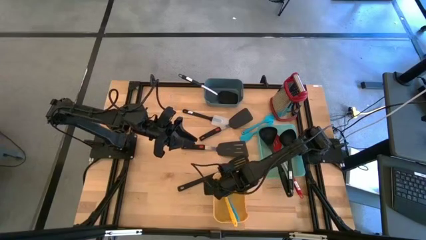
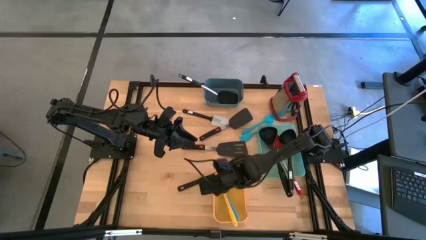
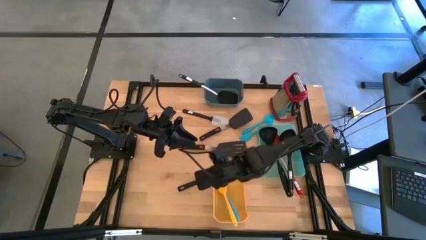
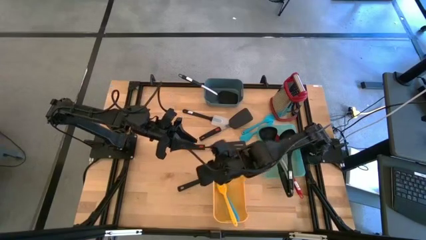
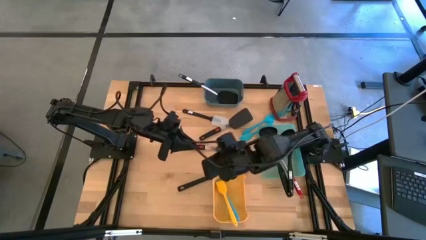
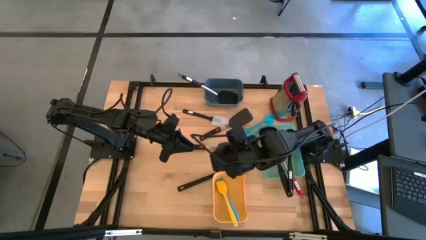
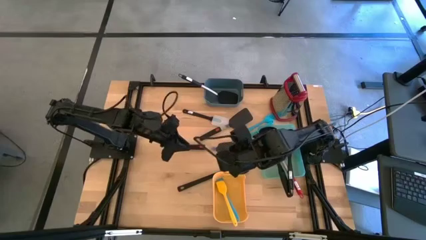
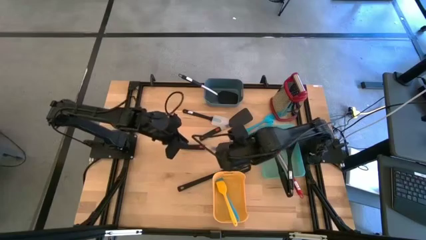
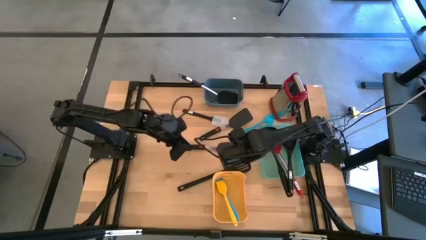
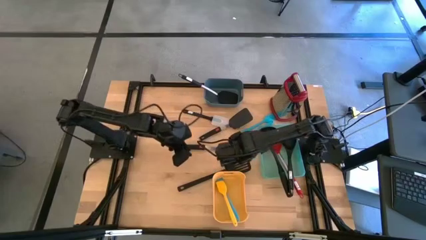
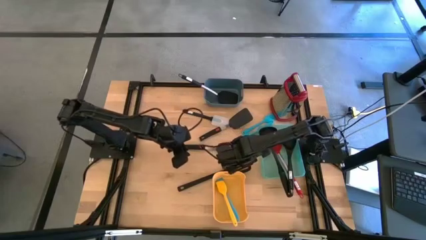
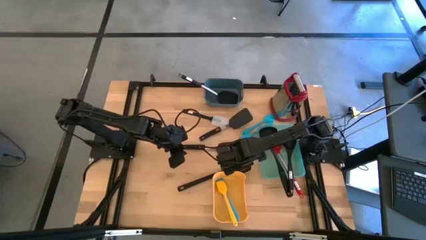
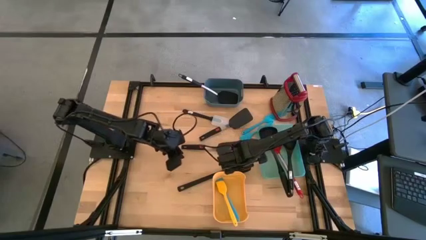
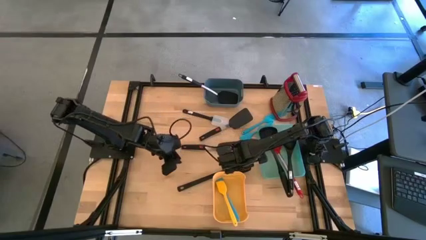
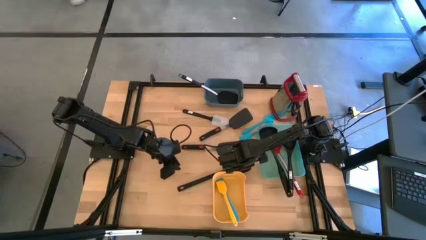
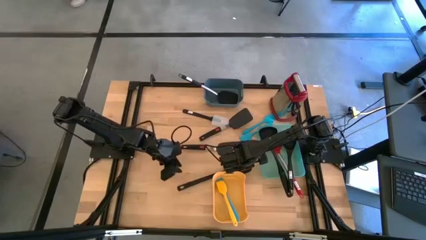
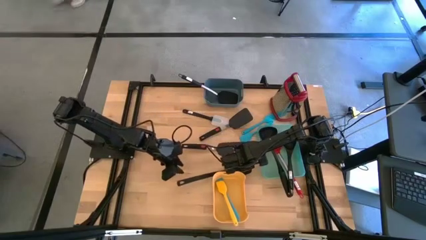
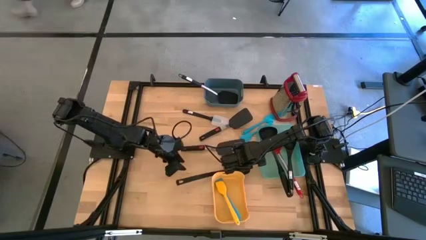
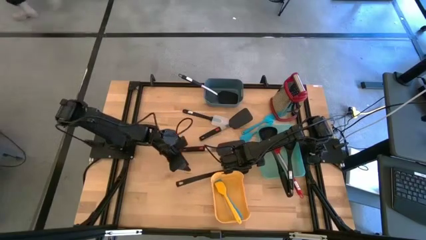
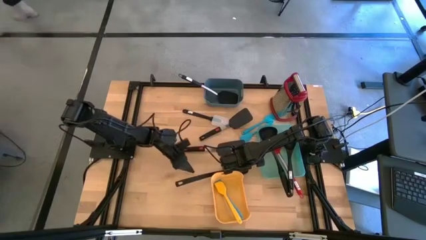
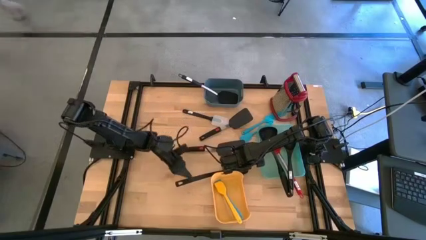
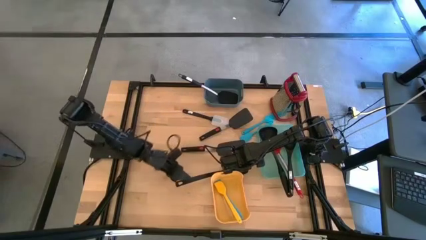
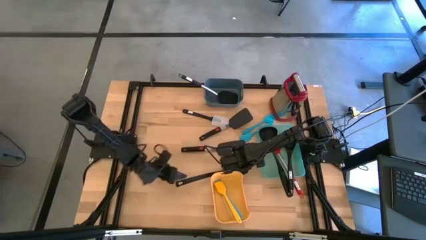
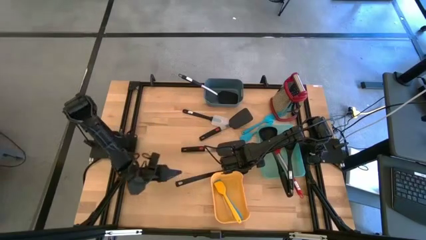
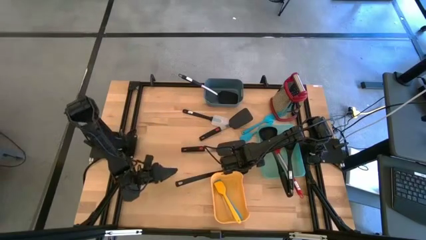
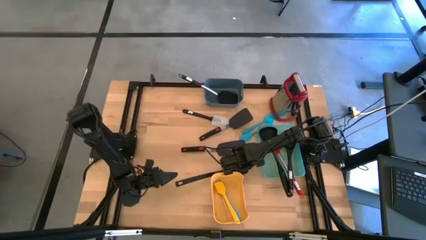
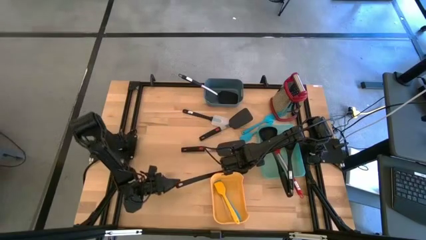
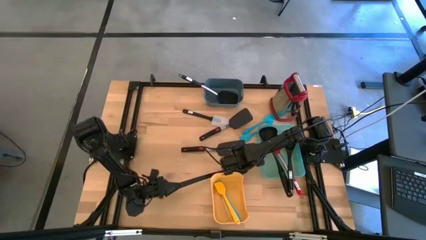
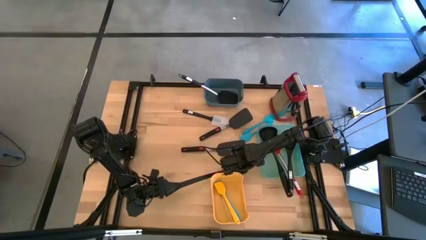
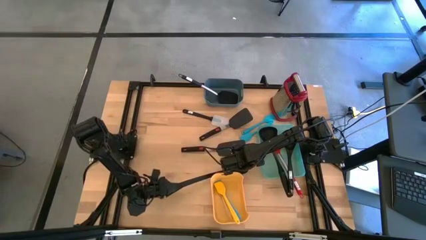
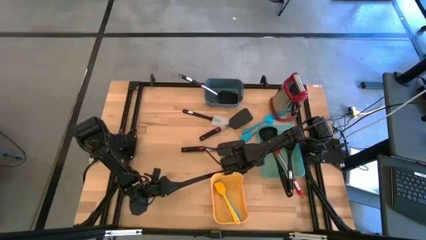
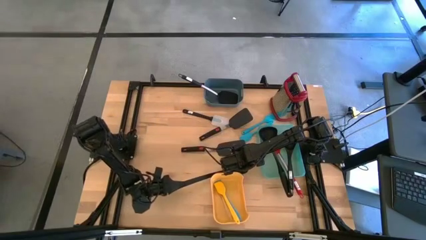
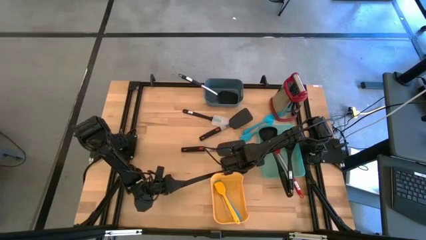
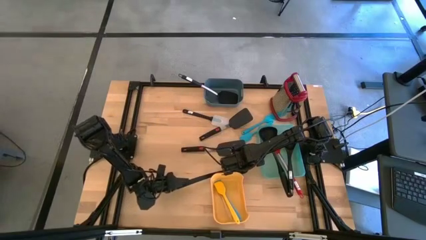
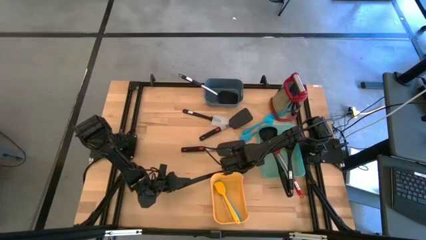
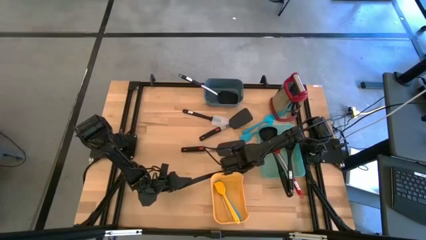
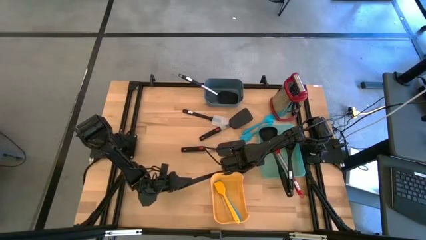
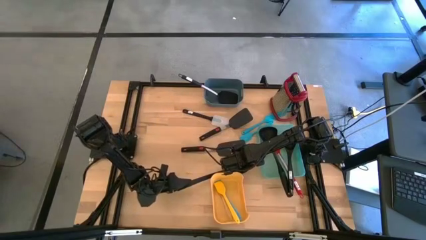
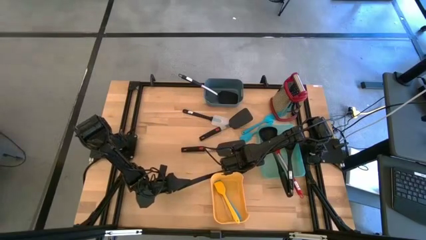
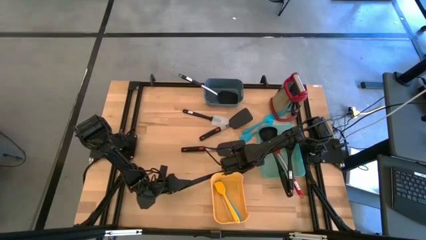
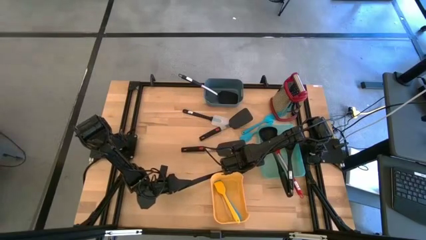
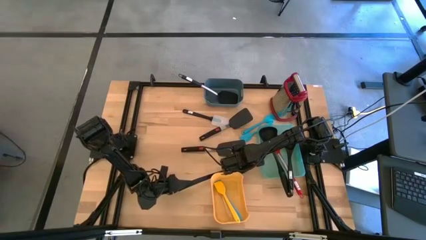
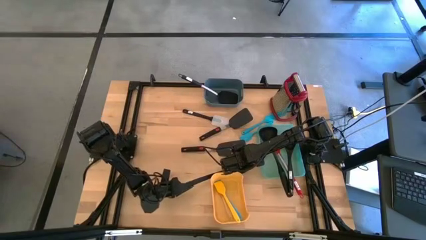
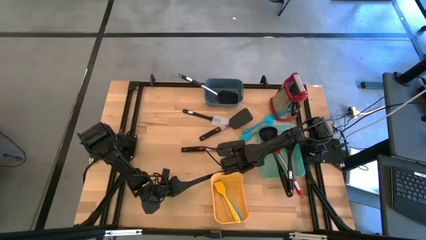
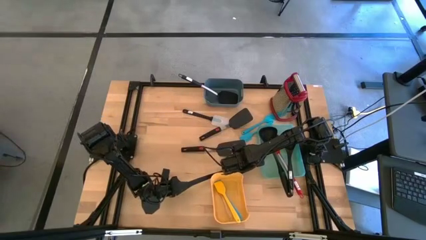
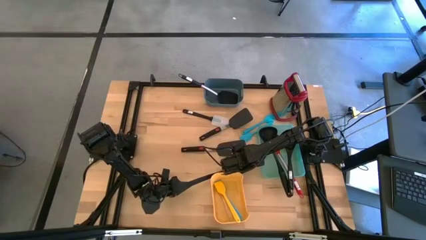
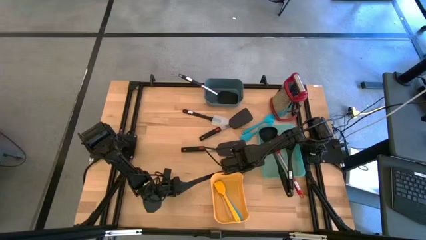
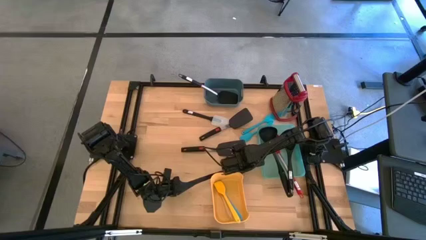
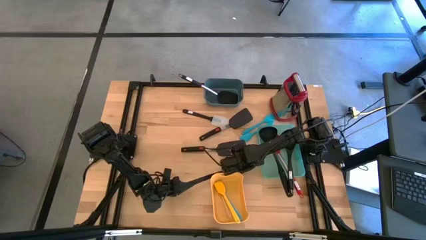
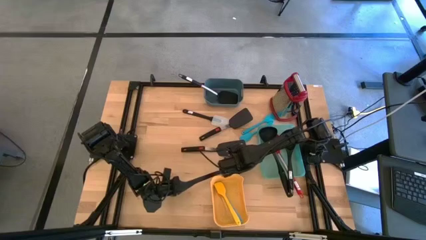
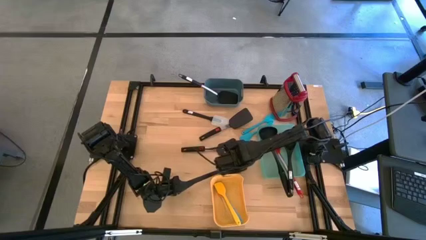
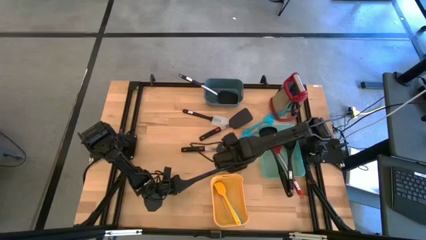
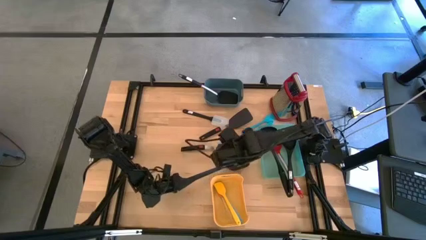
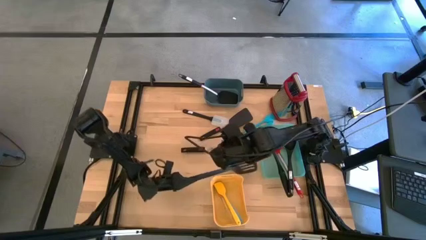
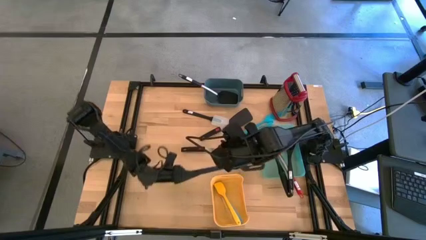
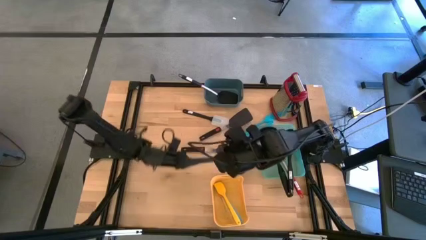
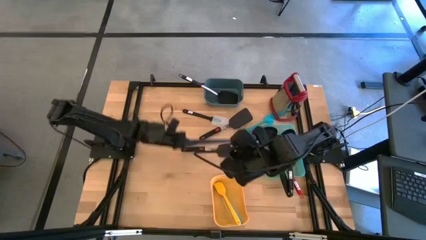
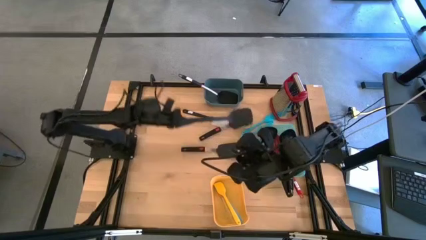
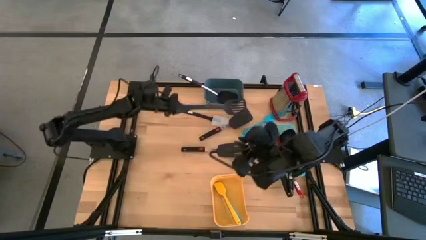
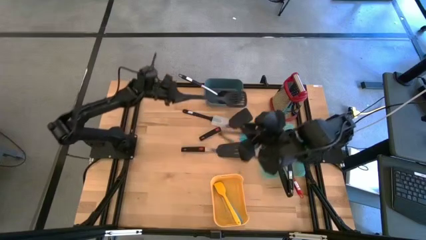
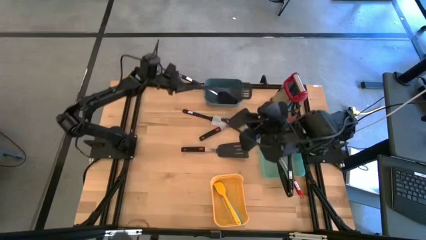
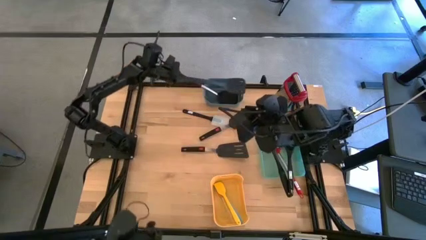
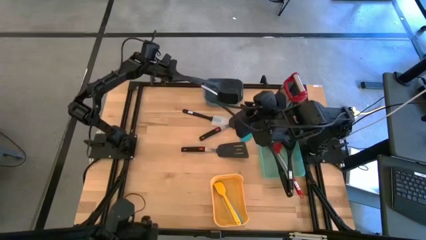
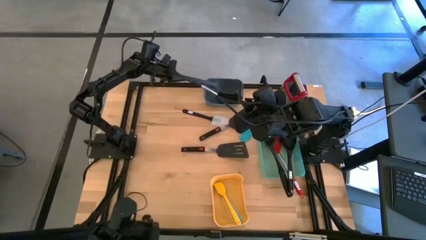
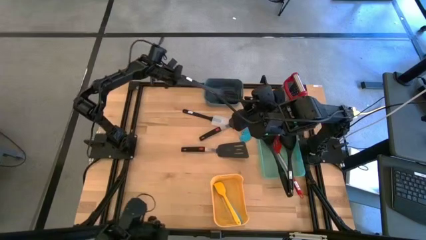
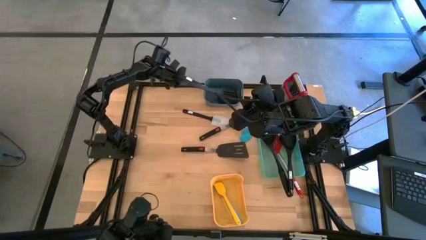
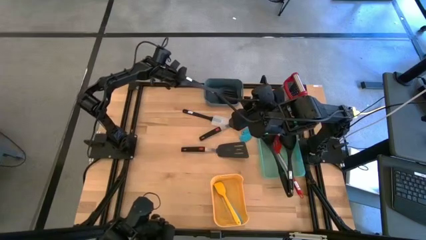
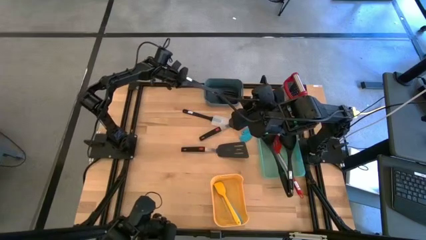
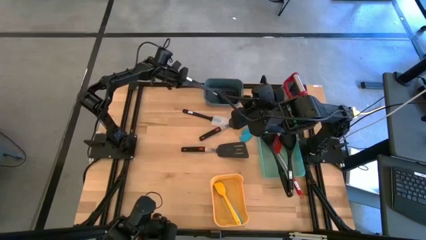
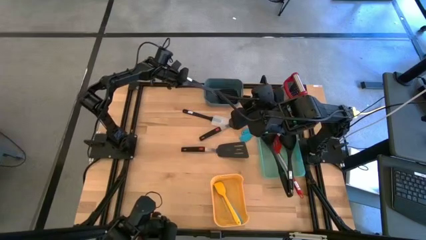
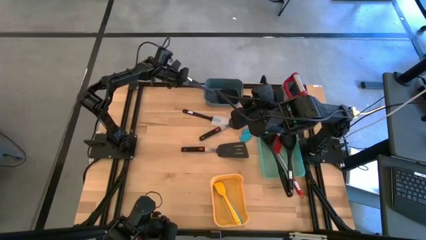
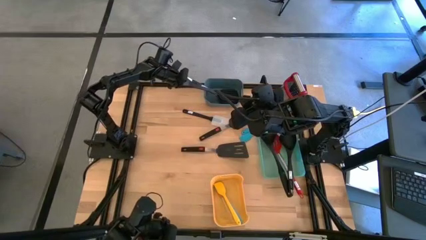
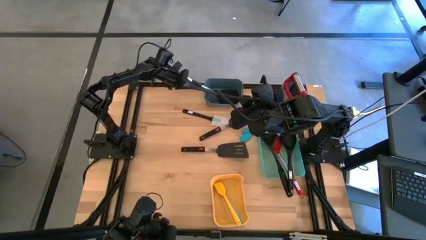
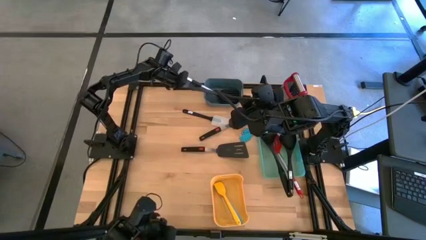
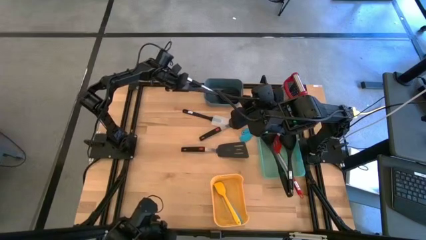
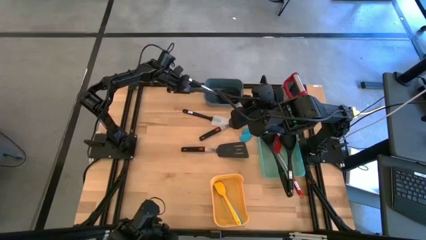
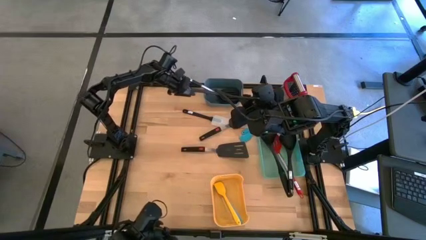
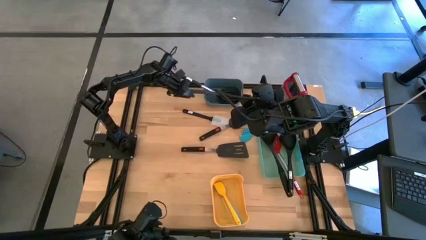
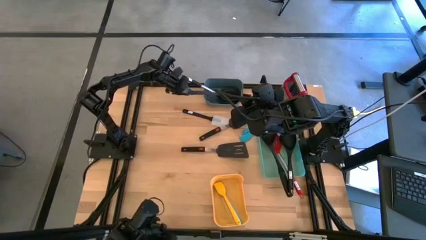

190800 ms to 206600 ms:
Task: Pick & Place Kitchen Items
Put the large black spatula into the blue bin

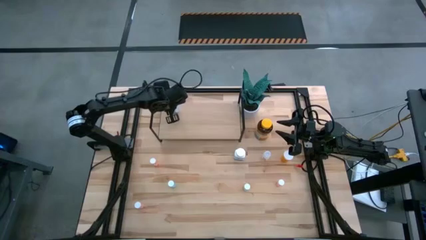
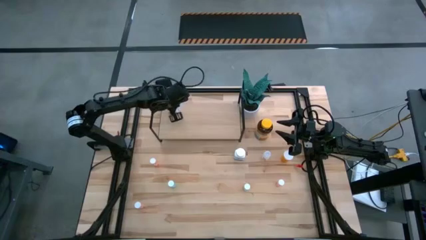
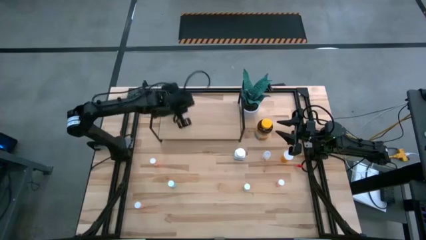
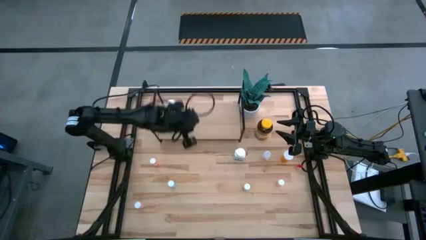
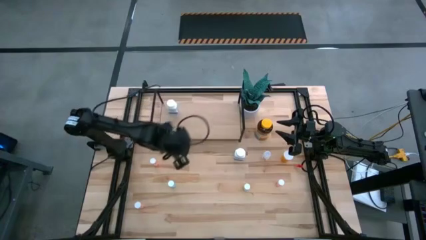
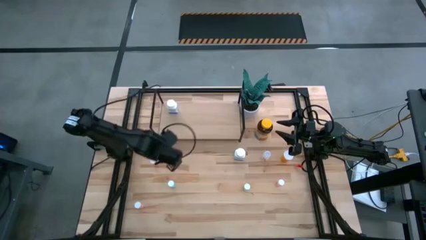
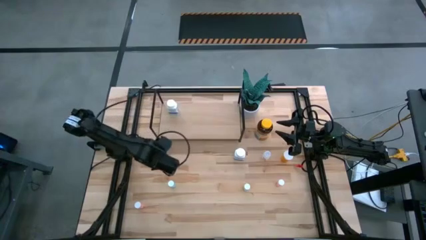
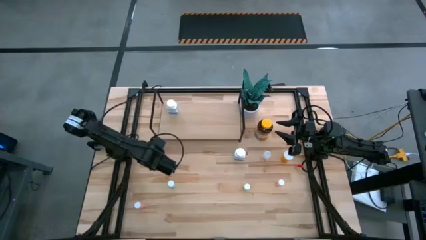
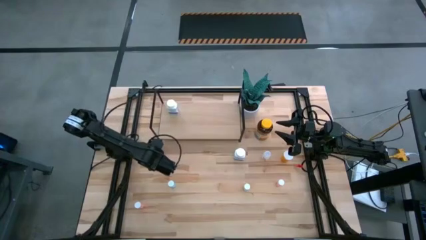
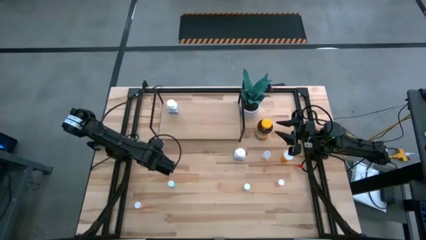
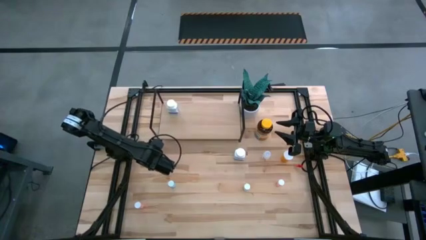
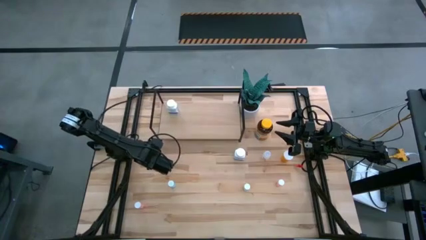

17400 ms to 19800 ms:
Task: Pick and place medicine bottles onto shelf by color
Put the left pink medicine bottle on the shelf
